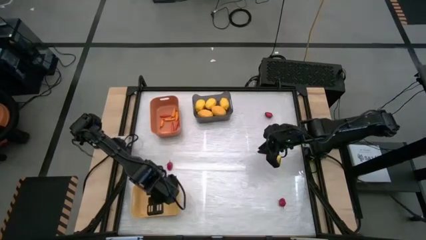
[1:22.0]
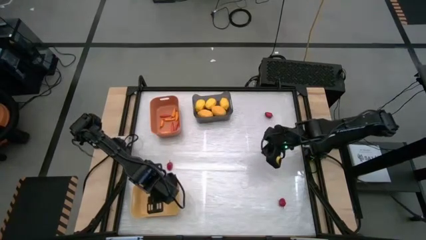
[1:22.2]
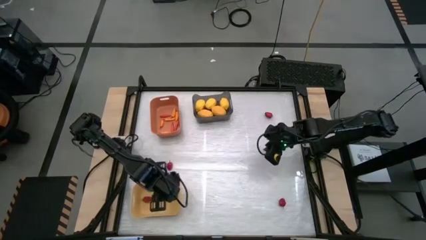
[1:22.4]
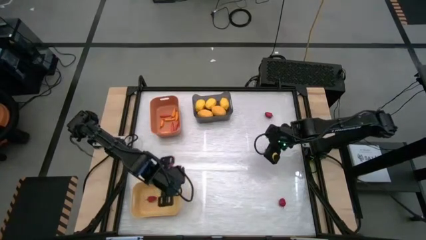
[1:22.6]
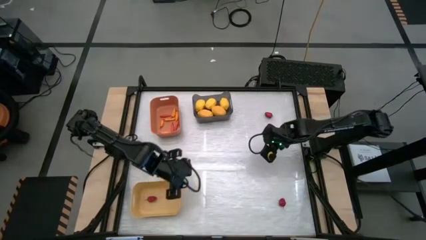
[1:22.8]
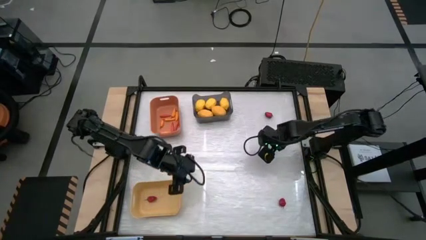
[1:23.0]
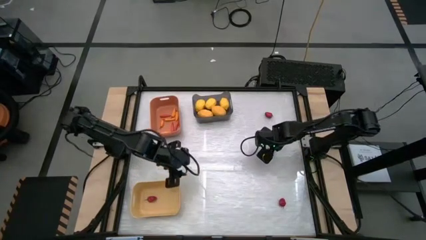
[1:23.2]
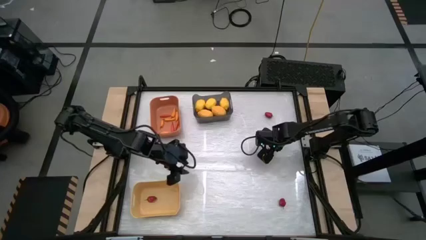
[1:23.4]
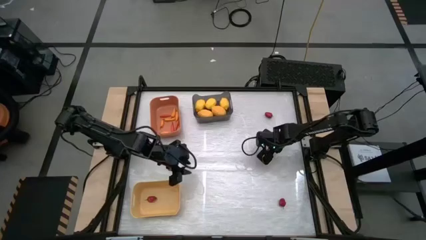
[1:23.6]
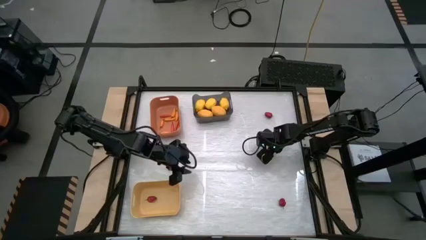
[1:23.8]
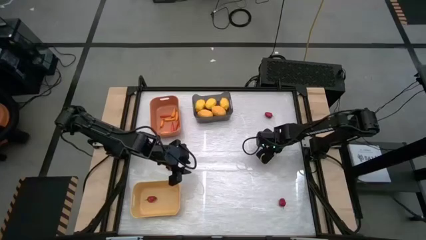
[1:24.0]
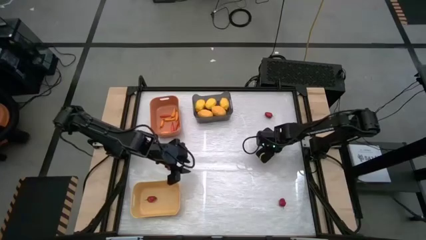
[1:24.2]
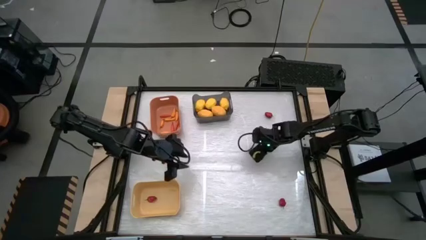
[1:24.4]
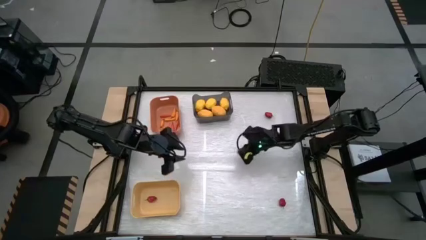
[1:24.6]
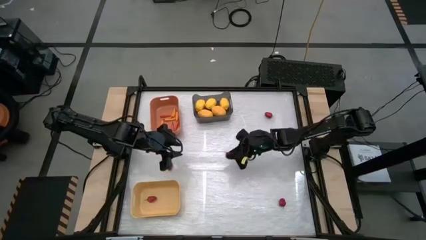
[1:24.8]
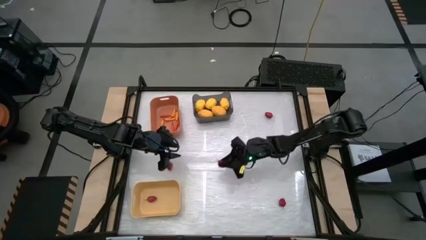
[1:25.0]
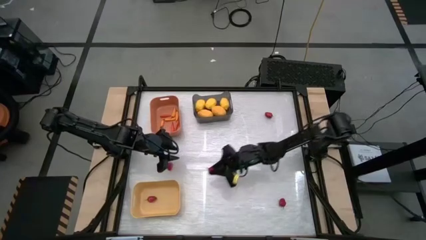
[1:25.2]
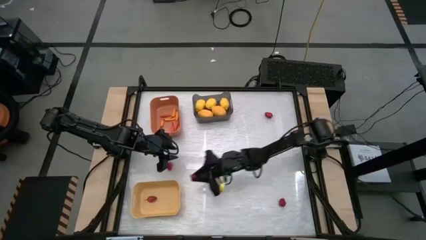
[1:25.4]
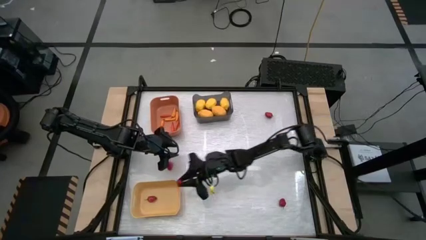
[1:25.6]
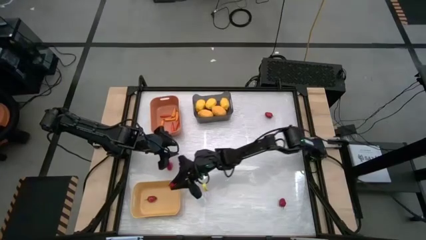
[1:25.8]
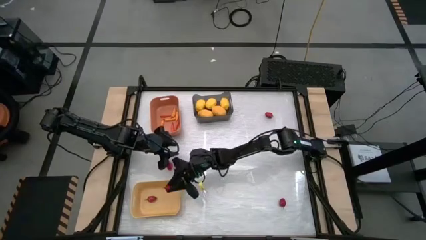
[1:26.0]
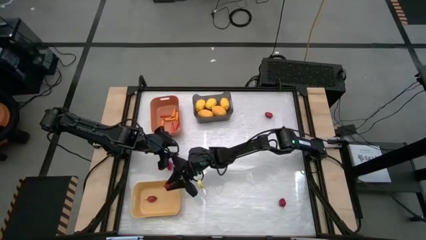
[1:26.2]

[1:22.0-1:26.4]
Task: Sort produce into baskets
Put the red chili pepper into the yellow bin

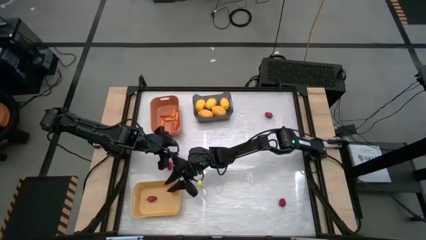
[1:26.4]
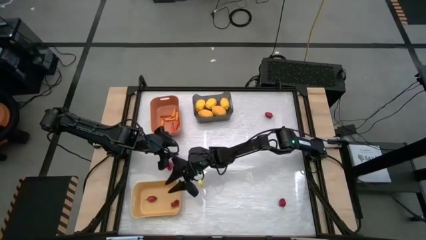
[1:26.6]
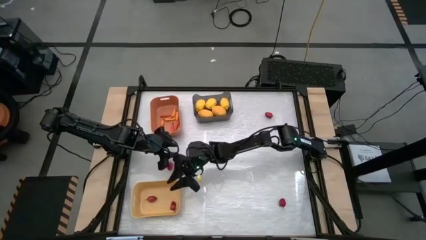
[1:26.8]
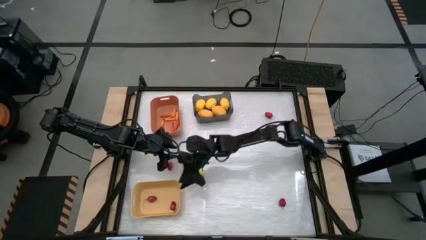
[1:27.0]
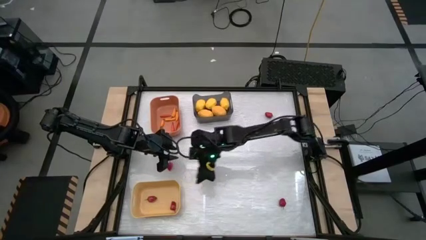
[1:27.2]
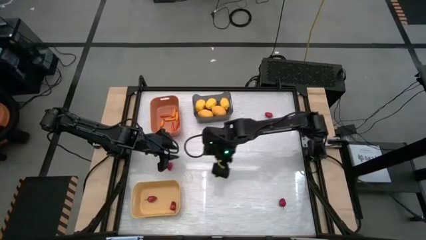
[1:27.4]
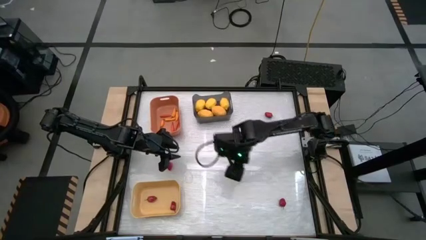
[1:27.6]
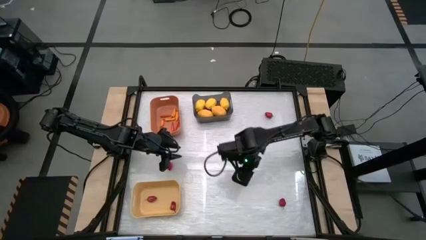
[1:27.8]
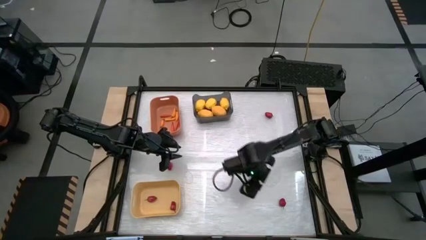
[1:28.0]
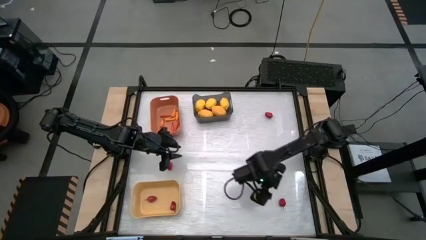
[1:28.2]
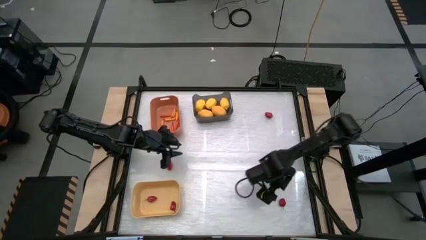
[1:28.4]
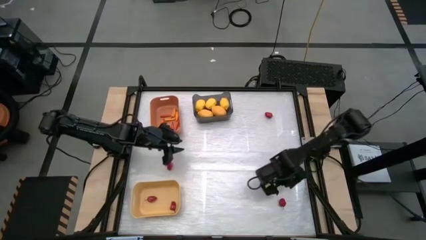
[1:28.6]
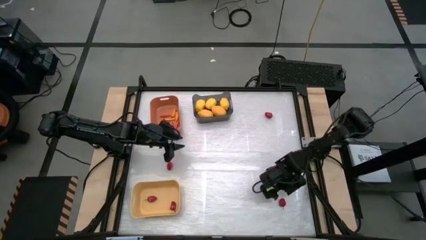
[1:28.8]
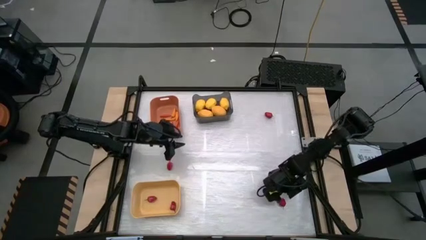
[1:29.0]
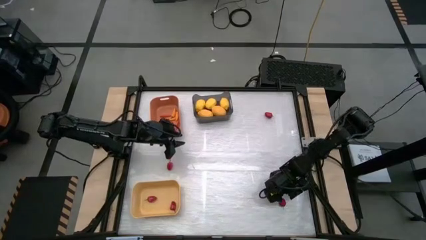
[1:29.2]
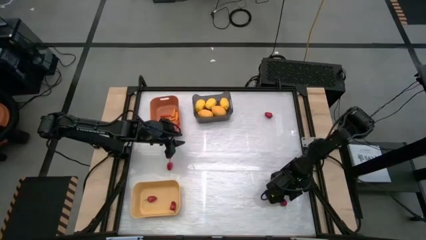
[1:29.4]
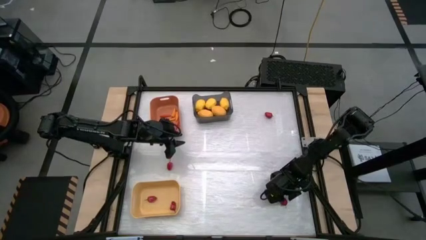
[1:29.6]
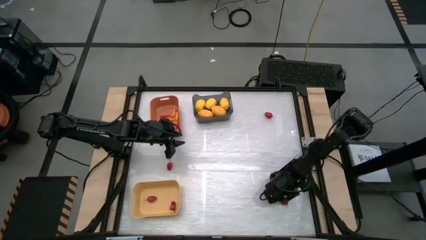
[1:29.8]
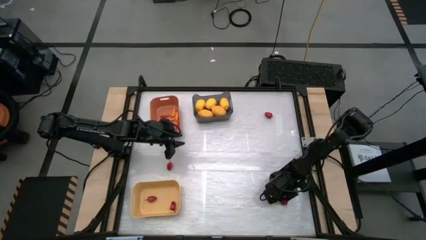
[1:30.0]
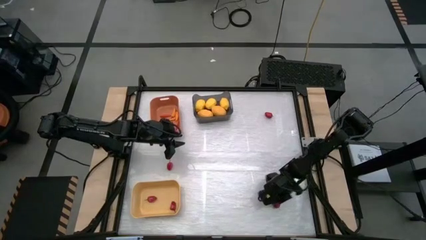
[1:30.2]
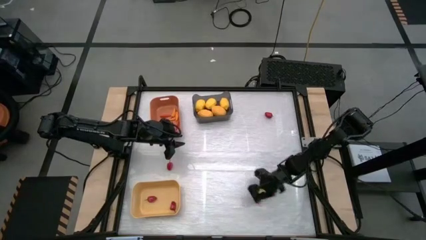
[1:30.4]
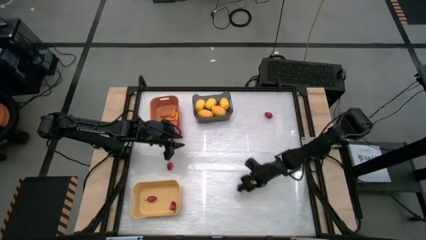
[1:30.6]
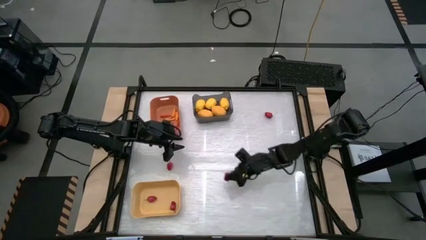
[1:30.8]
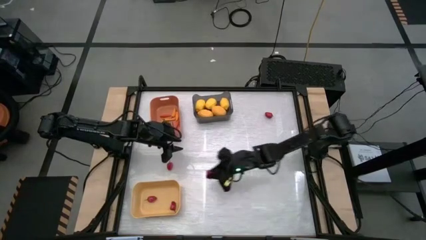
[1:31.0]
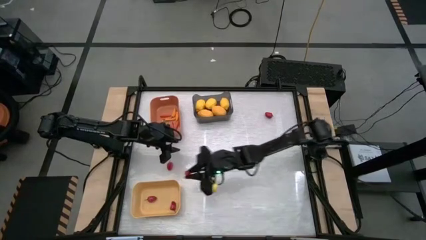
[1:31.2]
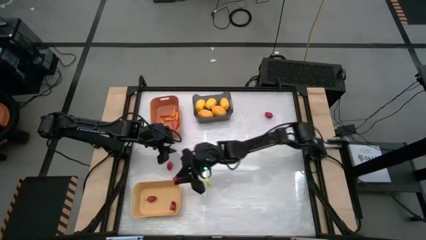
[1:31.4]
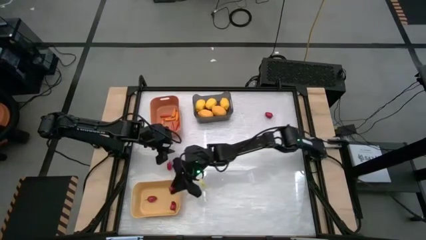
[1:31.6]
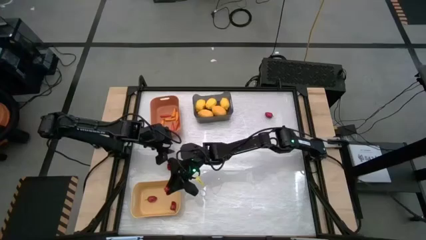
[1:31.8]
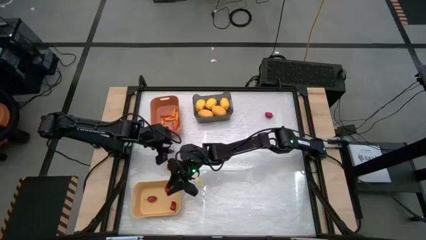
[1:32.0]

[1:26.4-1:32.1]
Put the red chili pepper into the yellow bin

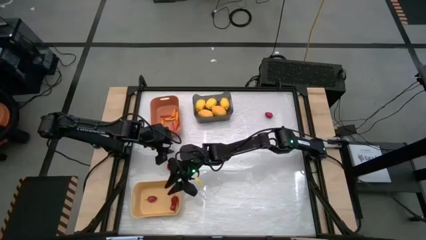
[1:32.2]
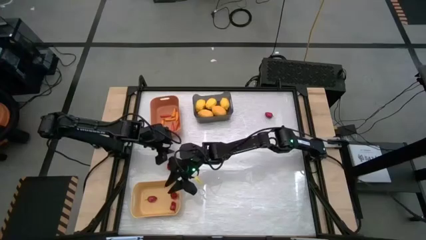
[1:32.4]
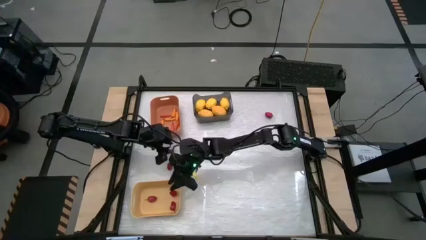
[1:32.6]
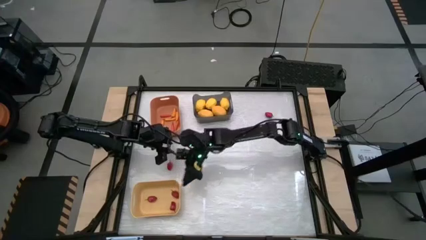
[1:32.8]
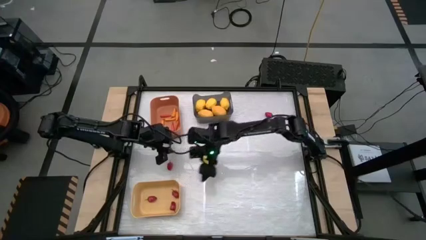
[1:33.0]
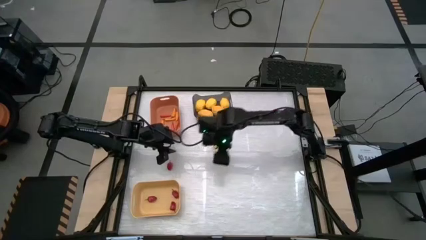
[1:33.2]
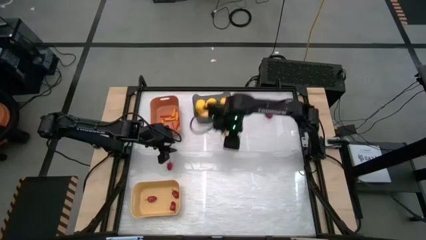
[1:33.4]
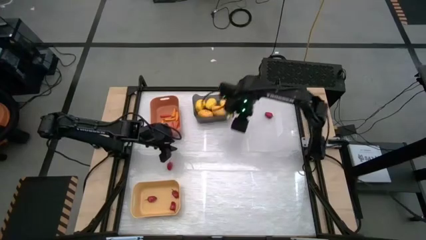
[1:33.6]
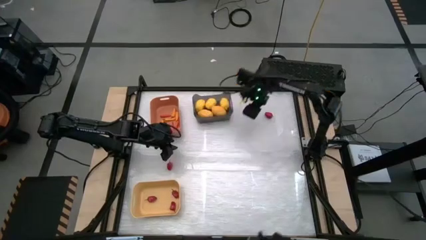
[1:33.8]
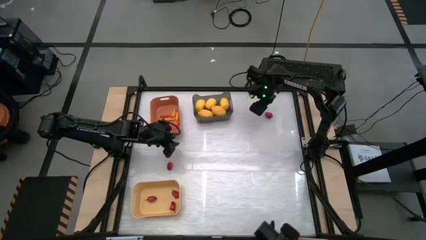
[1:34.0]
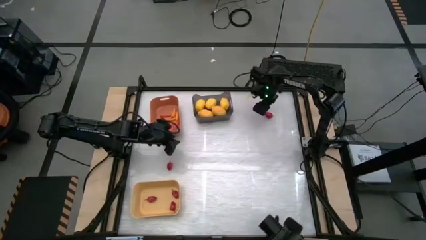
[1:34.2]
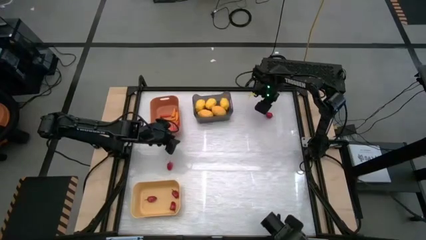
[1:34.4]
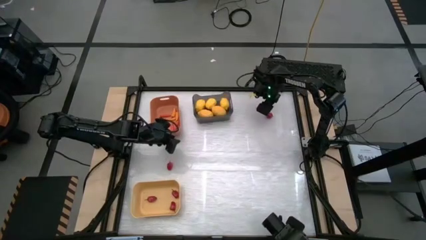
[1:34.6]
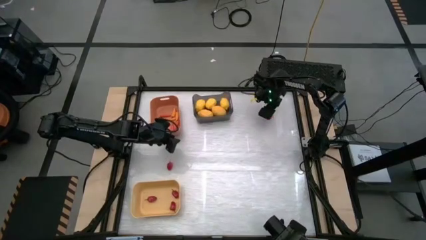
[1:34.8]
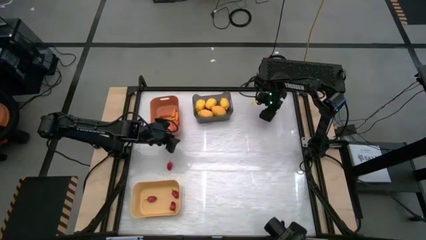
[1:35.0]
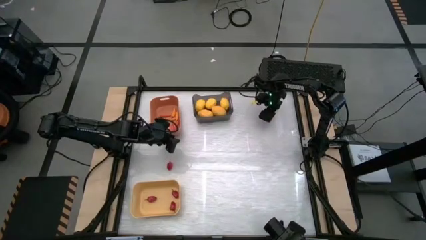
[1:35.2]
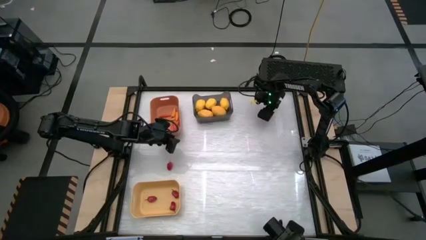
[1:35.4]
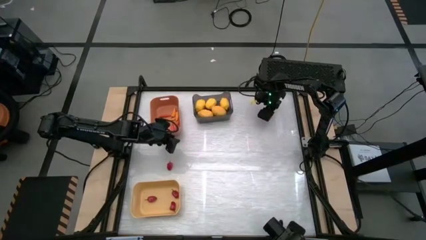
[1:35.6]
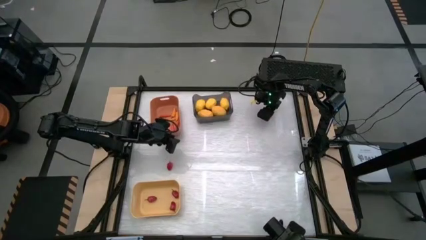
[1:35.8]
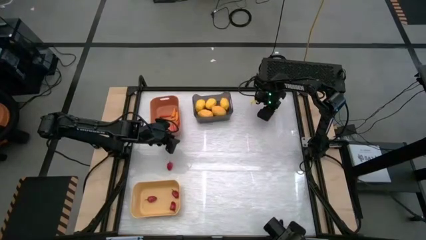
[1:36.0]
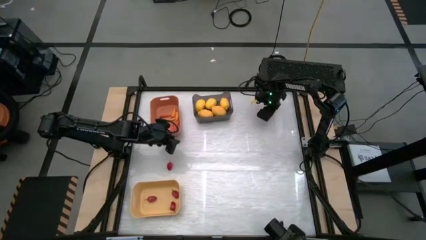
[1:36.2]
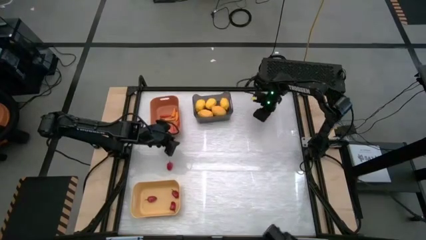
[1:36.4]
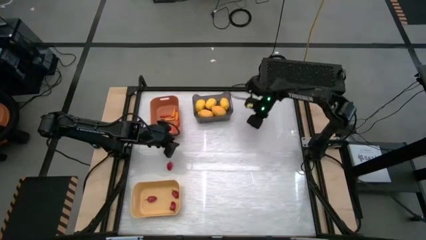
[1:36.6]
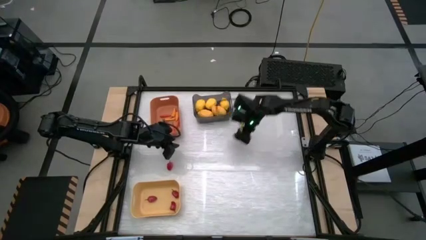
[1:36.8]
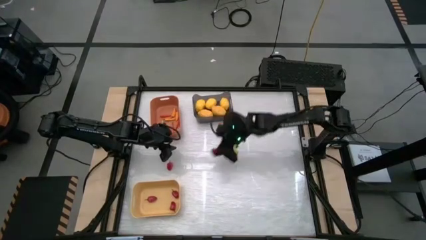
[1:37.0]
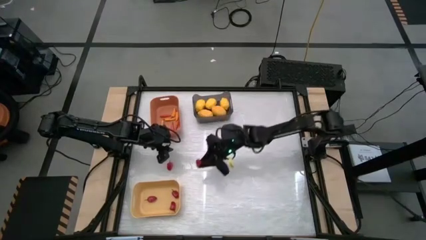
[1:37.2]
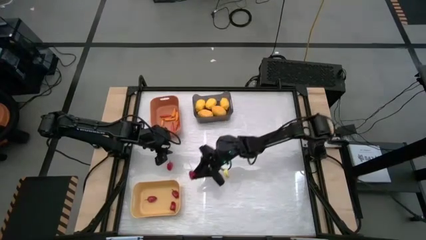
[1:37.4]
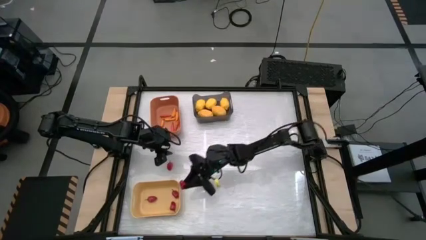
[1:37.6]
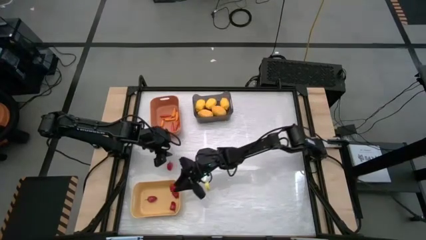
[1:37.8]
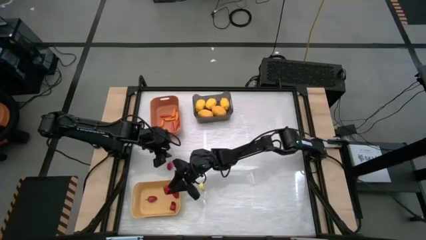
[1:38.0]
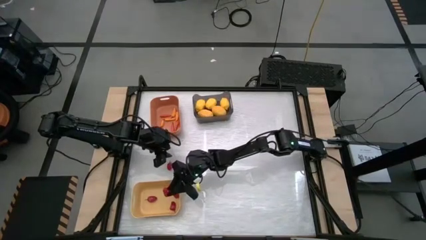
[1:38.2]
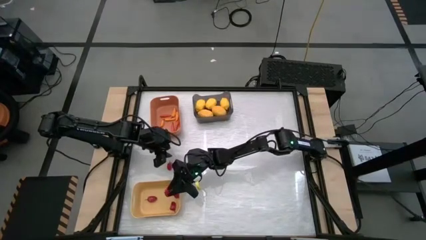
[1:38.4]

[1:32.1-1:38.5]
Put the red chili pepper into the yellow bin
